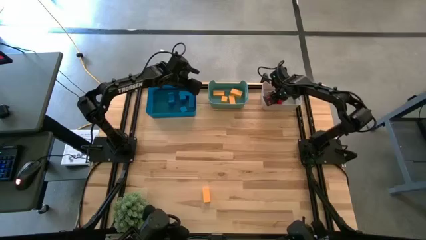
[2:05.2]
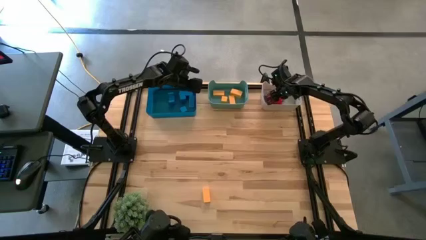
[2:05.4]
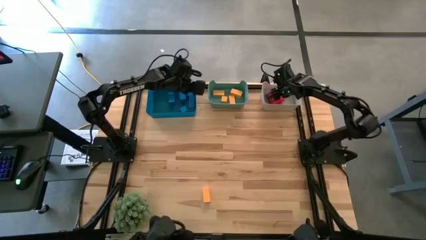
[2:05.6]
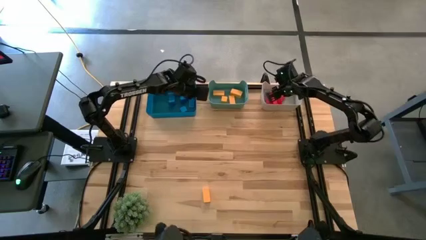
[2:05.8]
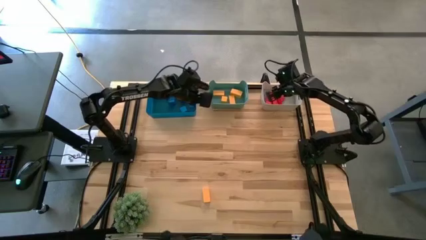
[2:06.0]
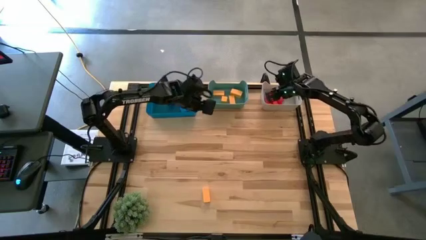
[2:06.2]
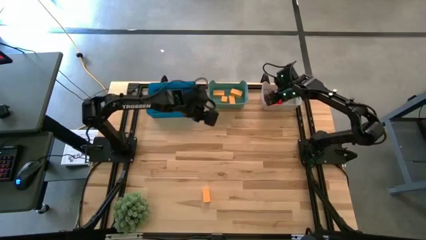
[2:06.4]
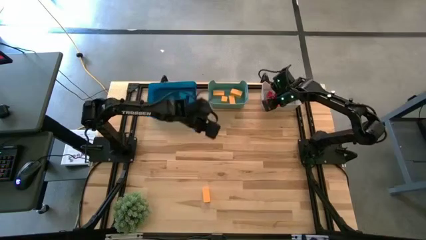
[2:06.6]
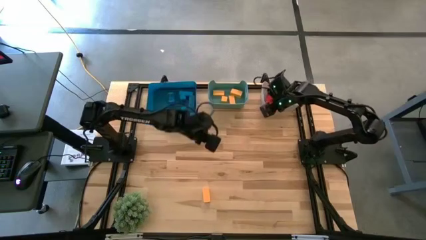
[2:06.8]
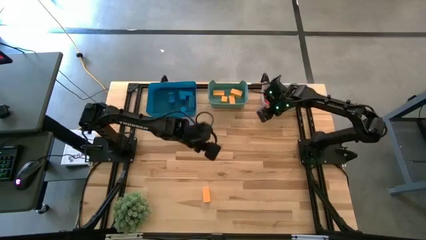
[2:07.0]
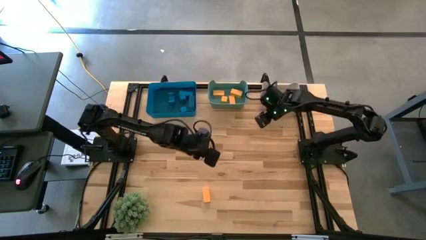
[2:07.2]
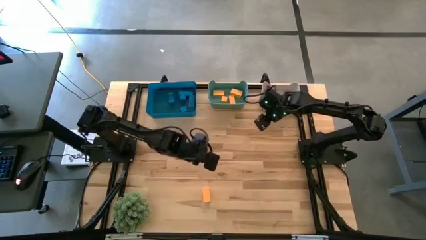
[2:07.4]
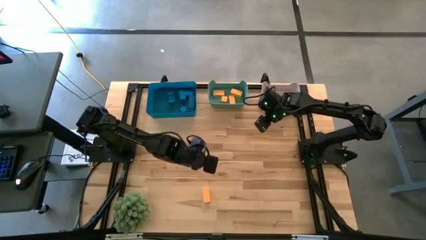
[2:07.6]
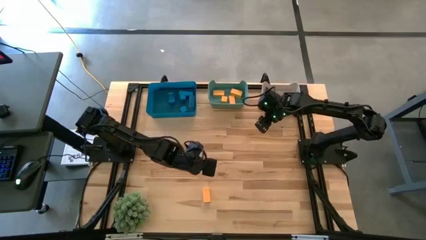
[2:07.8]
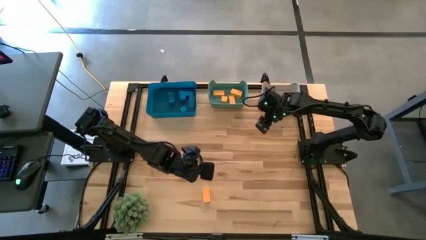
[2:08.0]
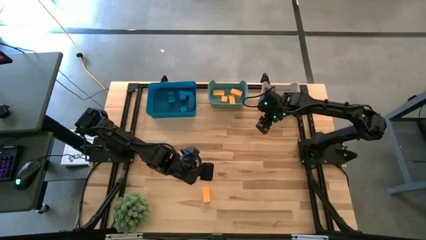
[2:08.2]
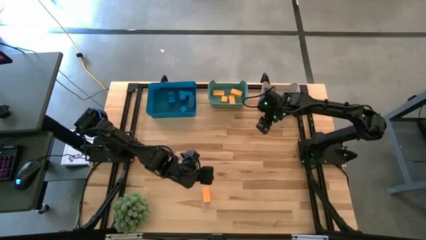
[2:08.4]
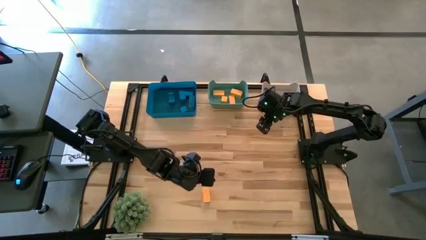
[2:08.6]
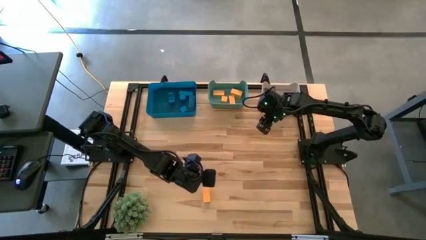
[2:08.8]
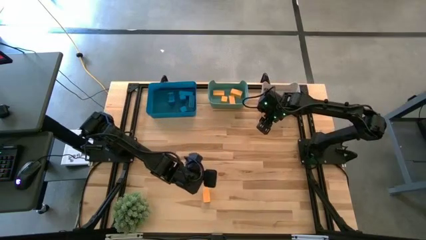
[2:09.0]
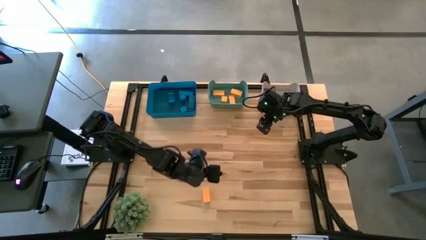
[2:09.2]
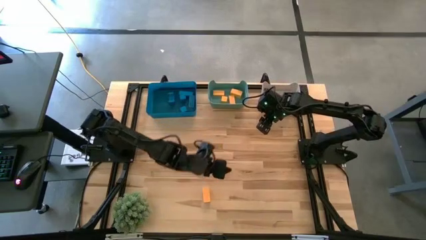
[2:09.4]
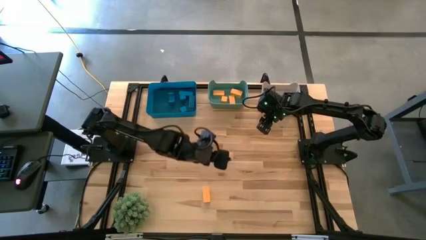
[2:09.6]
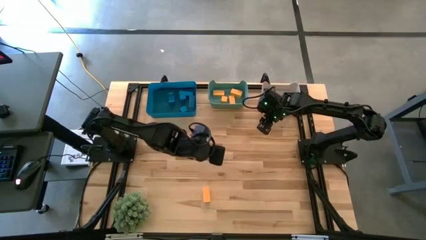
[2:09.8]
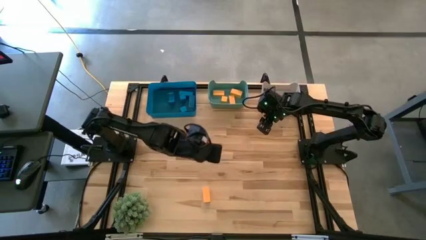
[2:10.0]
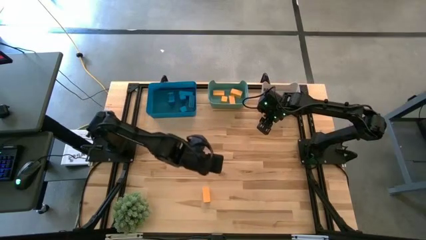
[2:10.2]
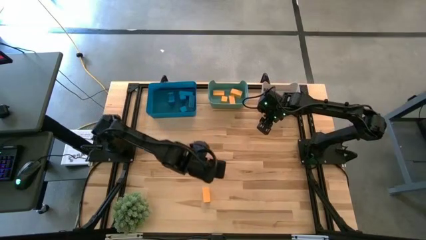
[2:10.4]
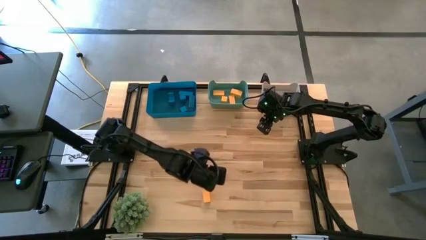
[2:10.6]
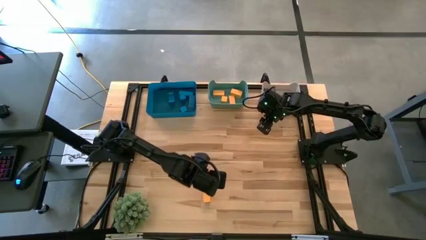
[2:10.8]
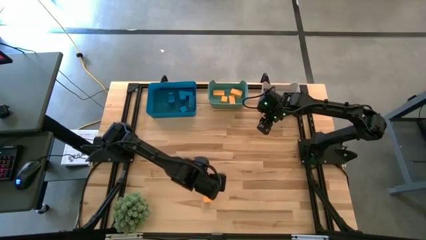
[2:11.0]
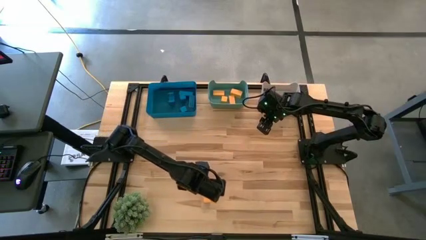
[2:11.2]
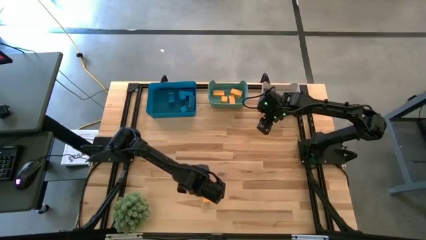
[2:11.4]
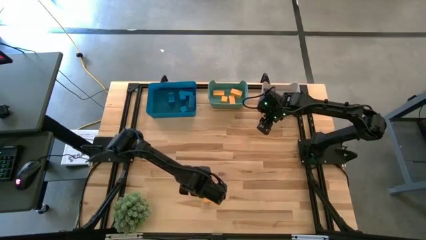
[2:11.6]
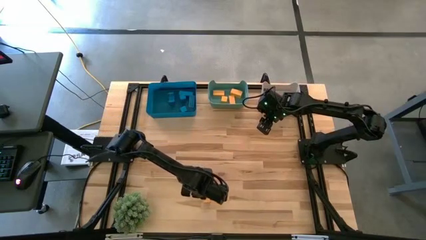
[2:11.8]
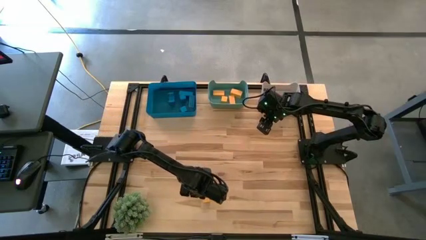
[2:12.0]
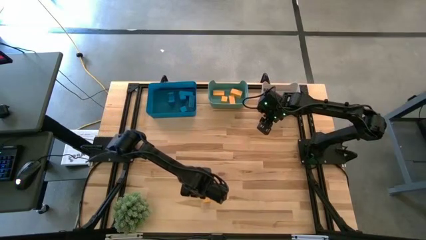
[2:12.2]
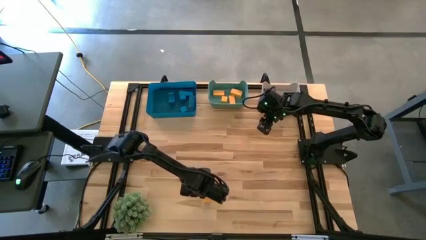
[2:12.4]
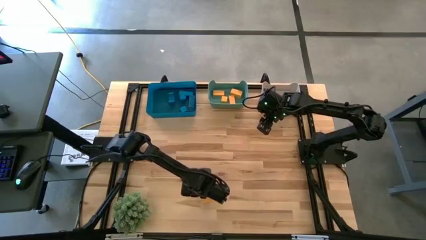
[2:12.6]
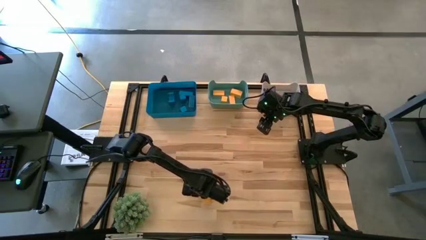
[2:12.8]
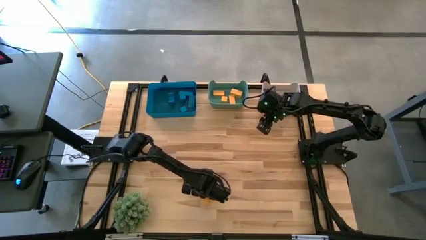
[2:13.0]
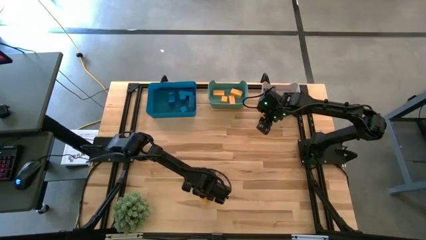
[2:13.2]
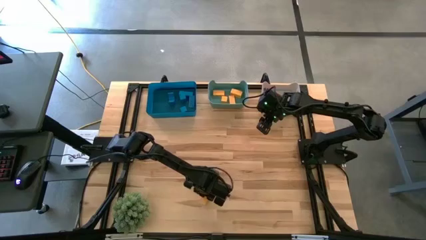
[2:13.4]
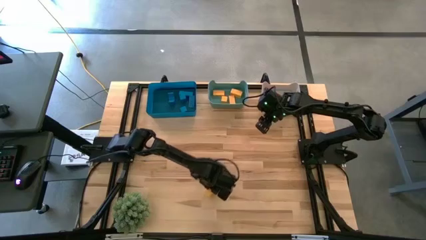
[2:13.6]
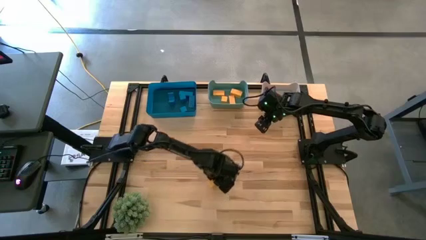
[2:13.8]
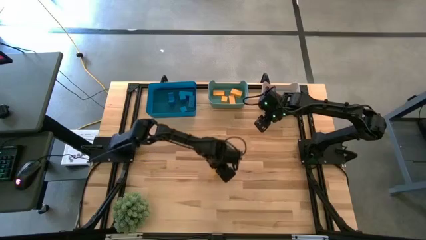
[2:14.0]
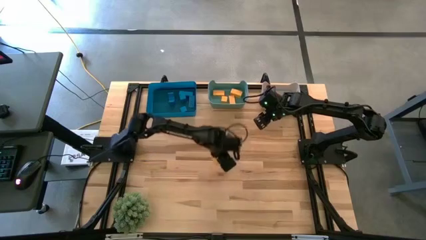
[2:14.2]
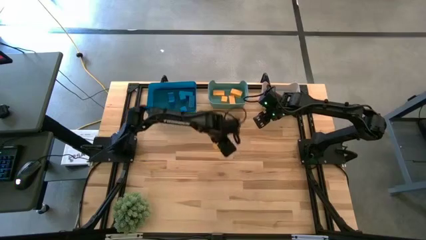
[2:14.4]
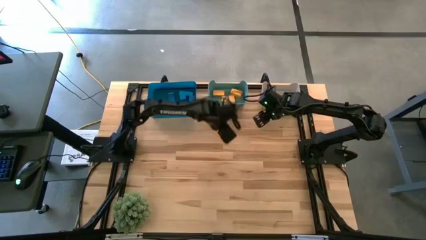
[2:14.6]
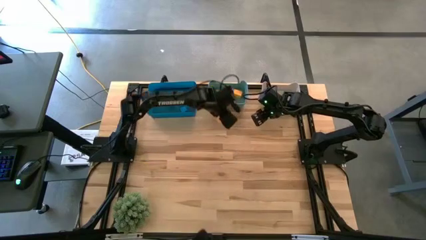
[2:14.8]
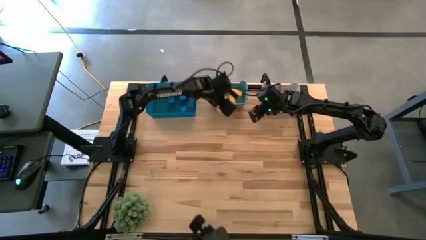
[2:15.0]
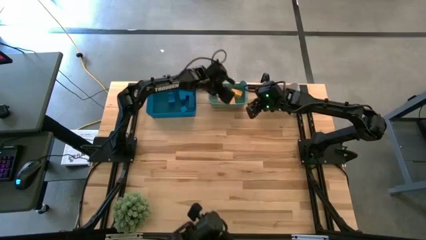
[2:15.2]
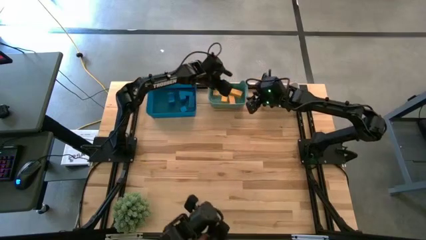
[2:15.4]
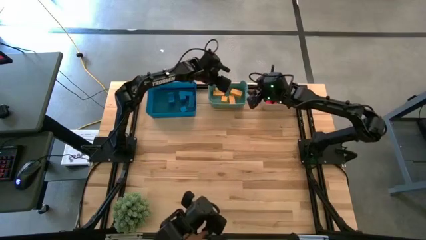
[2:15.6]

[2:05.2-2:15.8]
Task: Sort & place blocks by color
Put the yellow block into the green bin

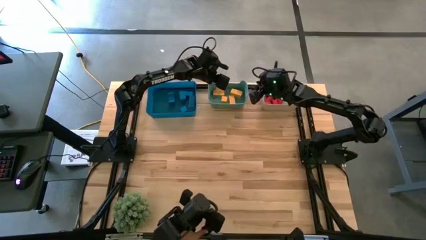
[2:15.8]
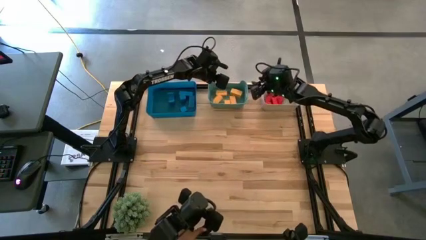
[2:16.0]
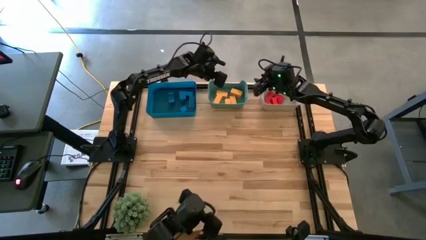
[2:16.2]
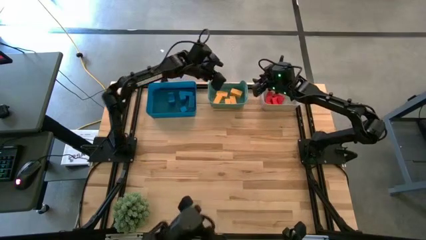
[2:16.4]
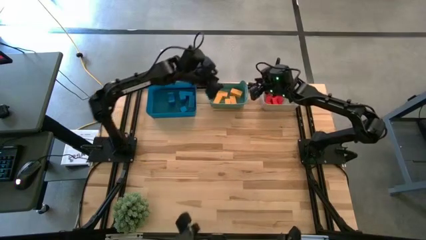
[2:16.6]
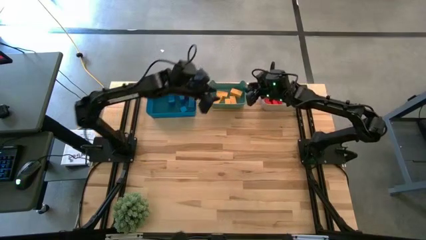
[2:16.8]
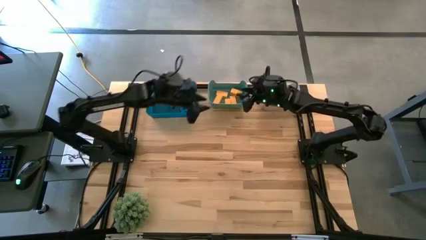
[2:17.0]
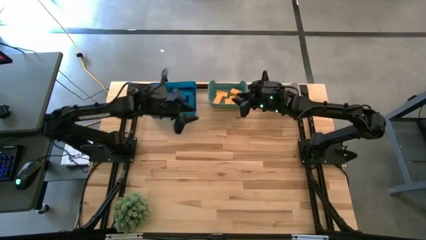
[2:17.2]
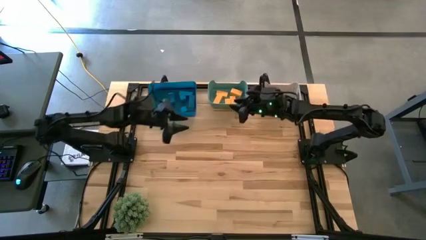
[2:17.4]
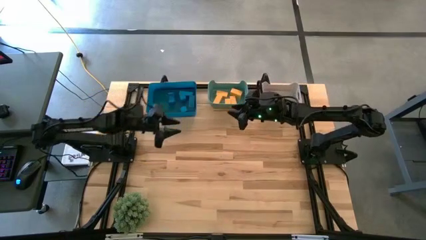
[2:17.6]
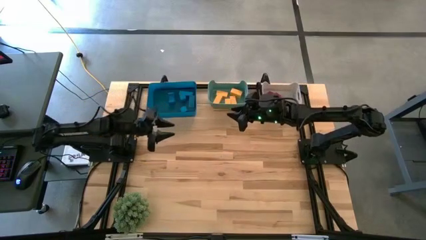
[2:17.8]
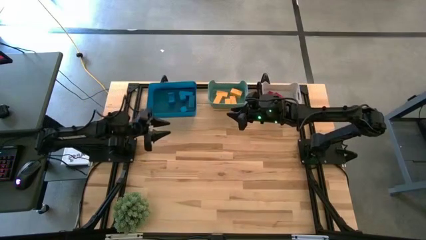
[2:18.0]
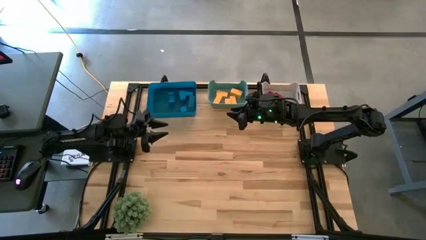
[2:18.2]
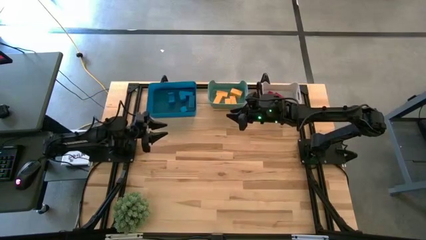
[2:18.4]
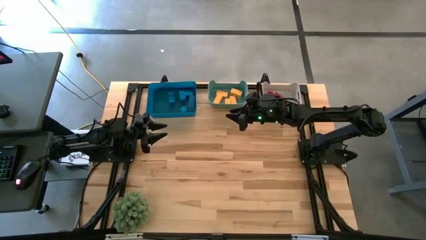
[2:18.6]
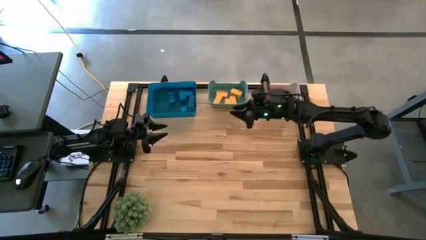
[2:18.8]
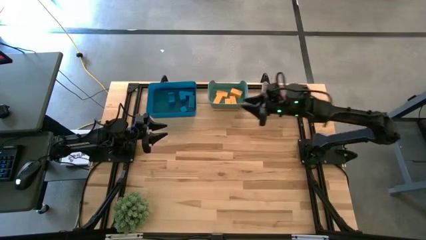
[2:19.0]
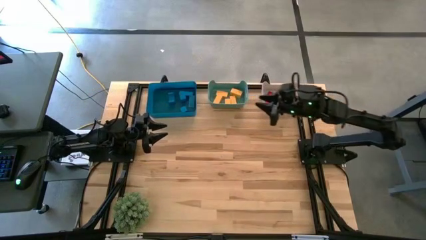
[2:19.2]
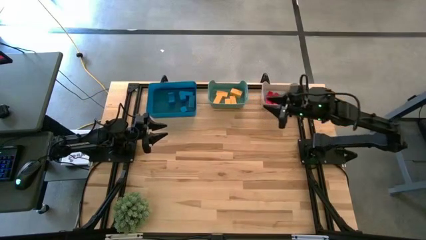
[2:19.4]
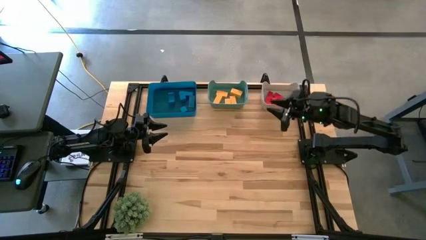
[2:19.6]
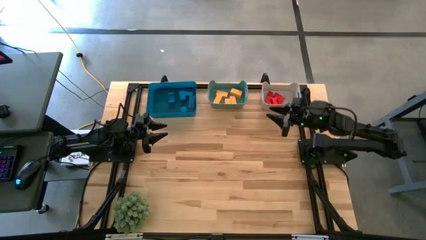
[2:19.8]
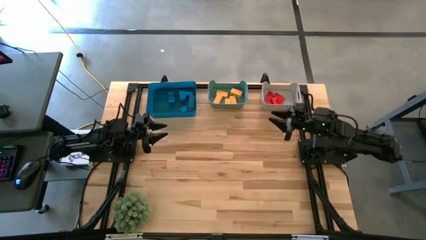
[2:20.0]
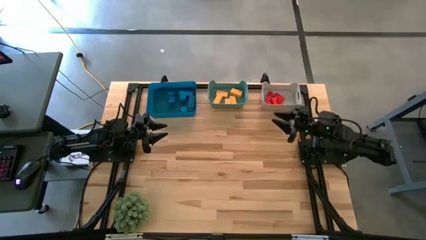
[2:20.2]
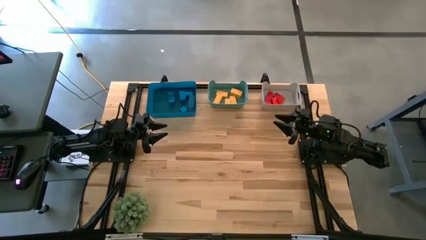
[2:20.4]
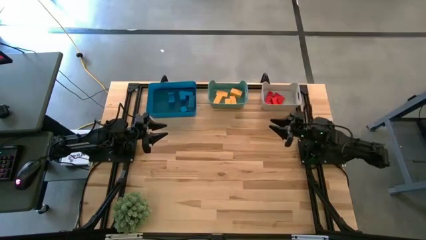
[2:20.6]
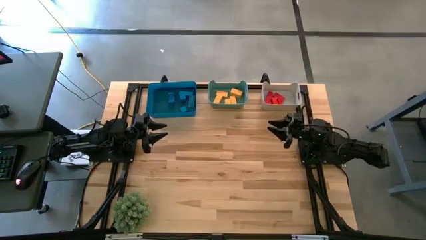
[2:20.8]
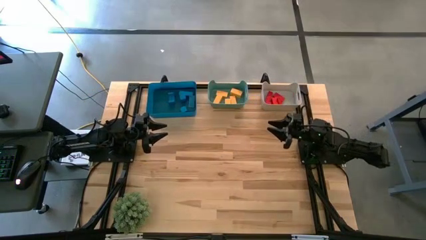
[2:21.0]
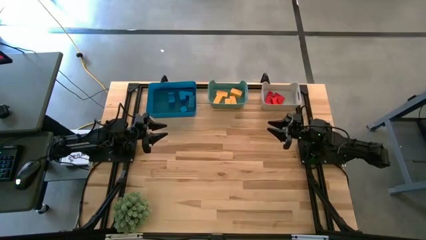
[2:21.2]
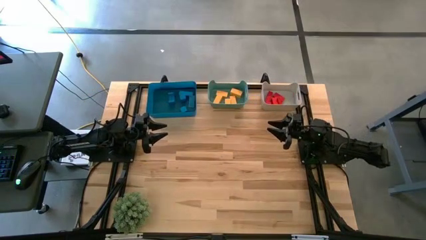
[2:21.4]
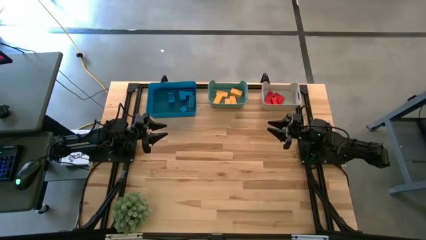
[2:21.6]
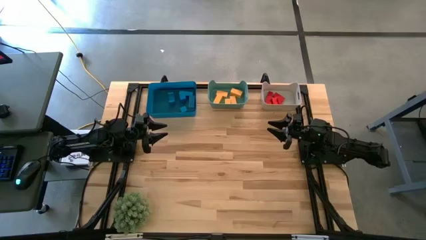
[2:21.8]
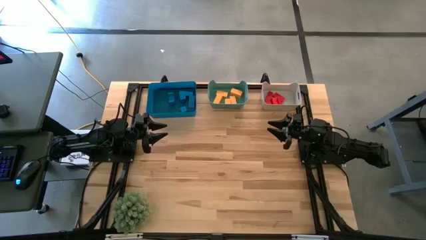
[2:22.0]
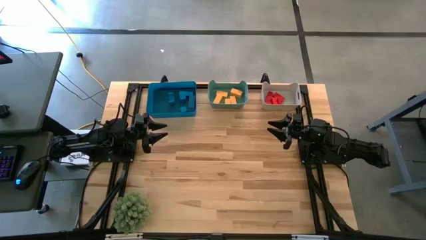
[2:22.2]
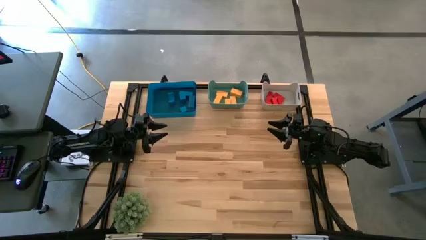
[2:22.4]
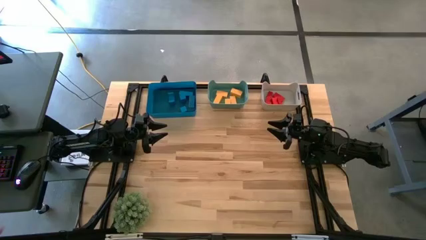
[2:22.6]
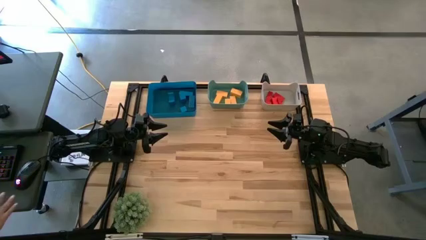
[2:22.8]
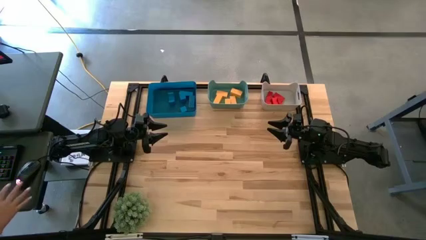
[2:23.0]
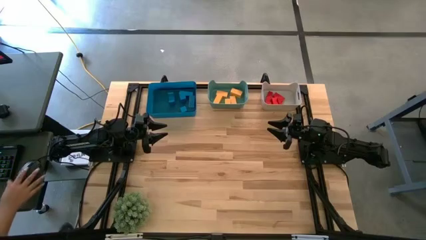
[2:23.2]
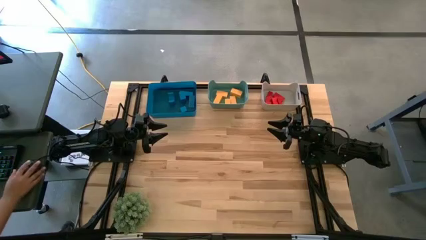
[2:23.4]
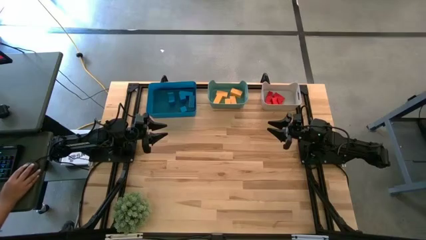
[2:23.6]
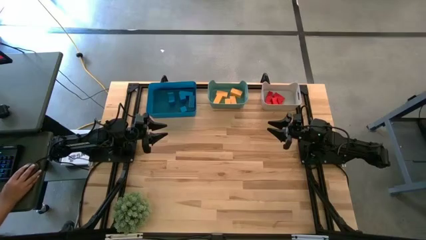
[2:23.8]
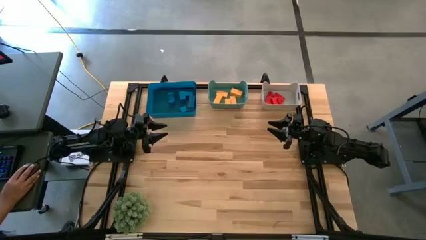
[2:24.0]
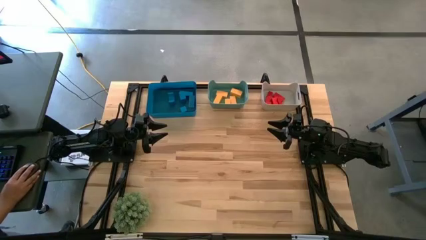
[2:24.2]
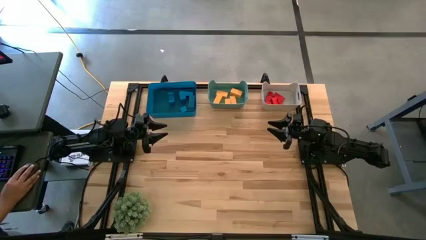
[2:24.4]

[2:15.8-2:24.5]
Return to Home Position
